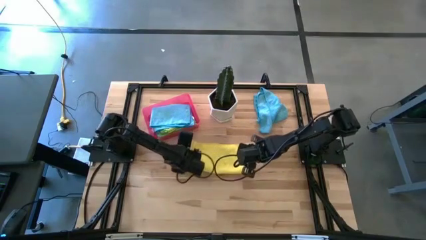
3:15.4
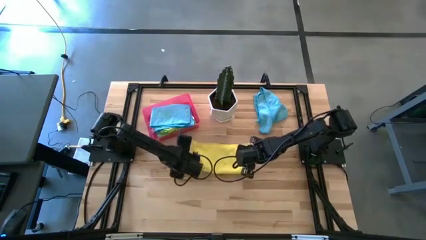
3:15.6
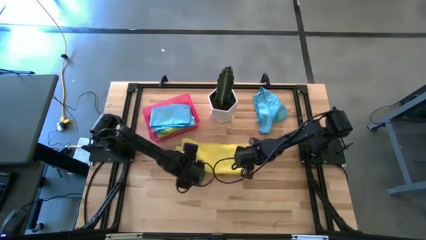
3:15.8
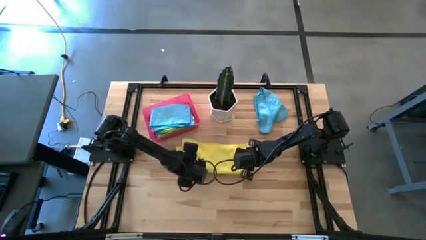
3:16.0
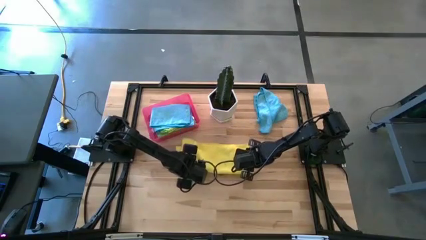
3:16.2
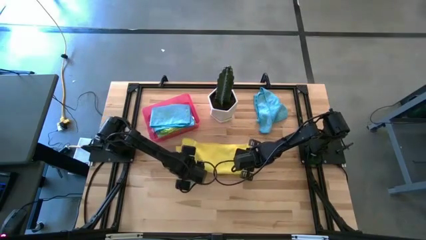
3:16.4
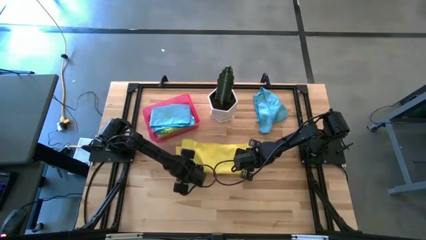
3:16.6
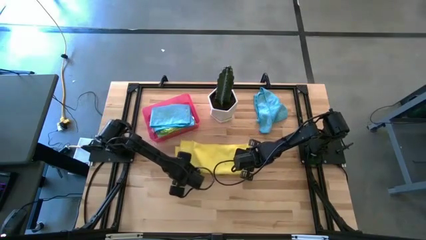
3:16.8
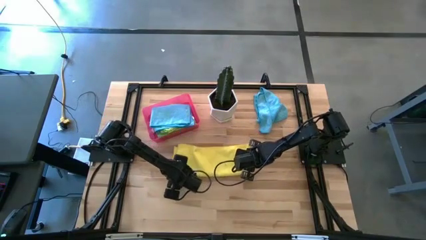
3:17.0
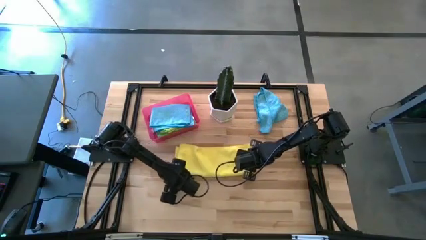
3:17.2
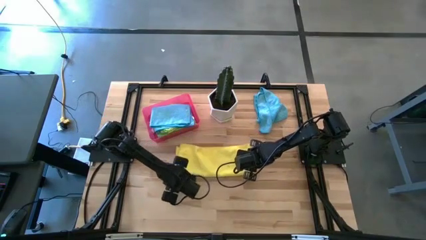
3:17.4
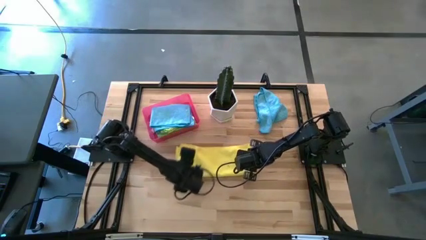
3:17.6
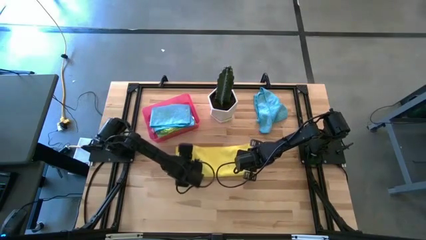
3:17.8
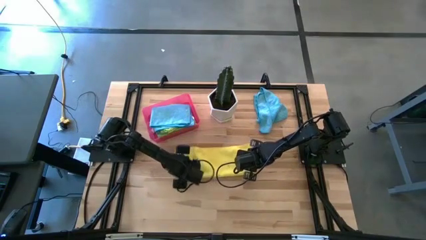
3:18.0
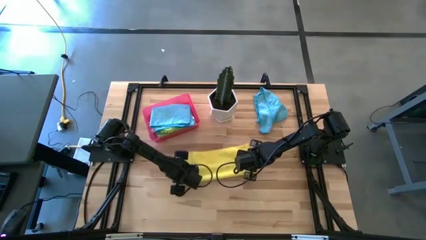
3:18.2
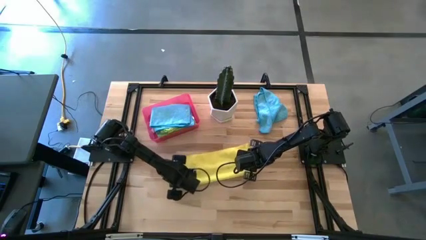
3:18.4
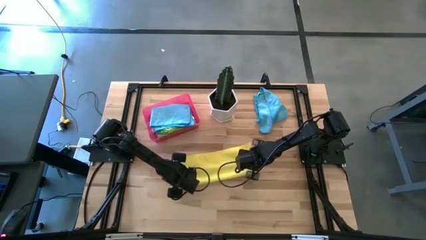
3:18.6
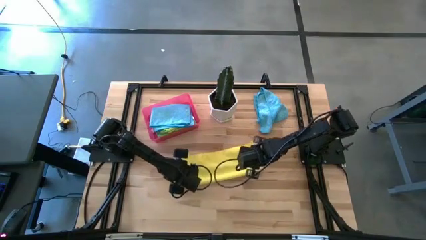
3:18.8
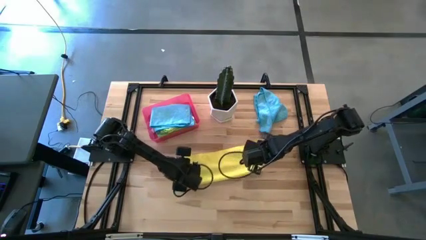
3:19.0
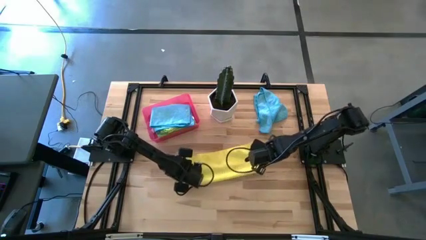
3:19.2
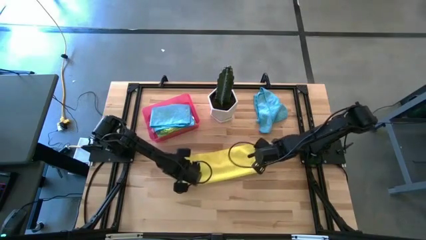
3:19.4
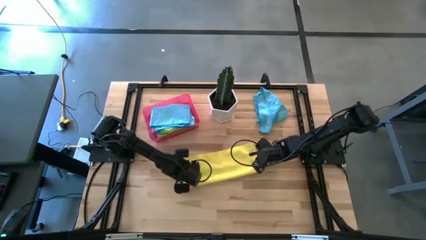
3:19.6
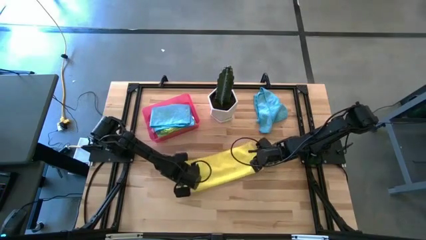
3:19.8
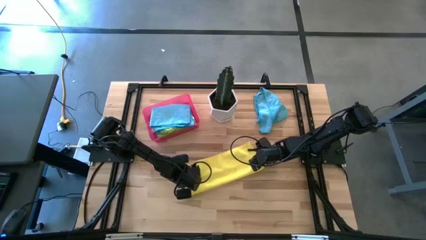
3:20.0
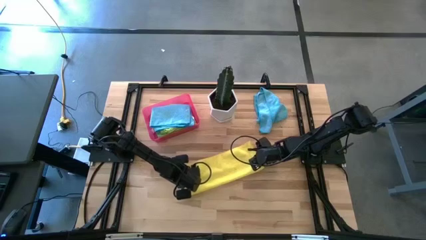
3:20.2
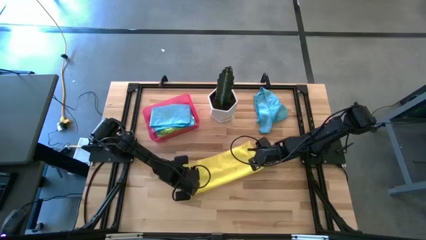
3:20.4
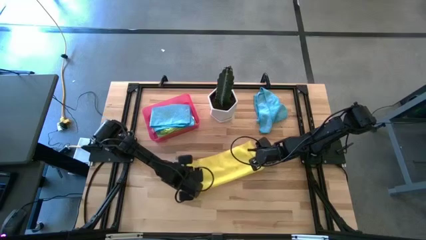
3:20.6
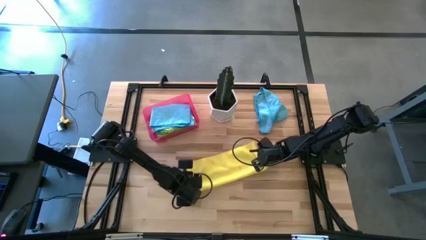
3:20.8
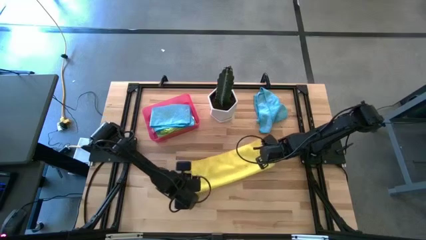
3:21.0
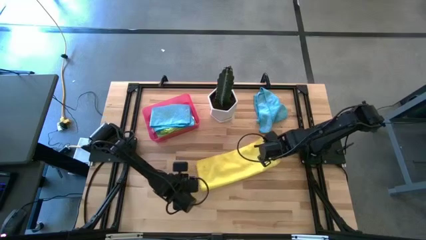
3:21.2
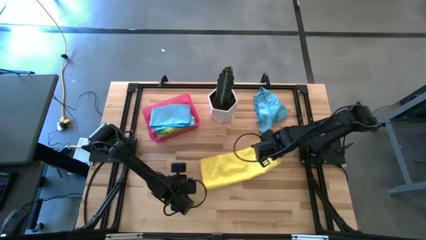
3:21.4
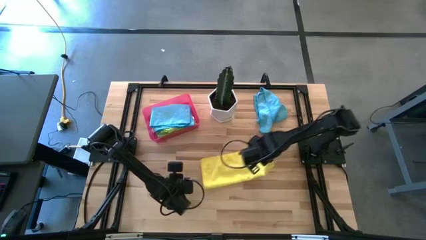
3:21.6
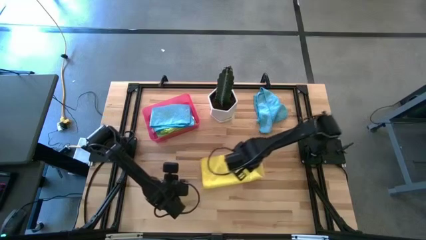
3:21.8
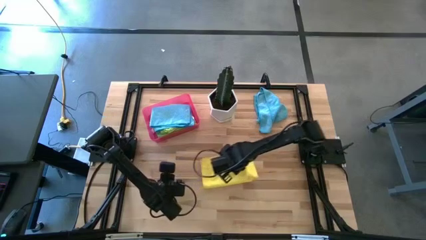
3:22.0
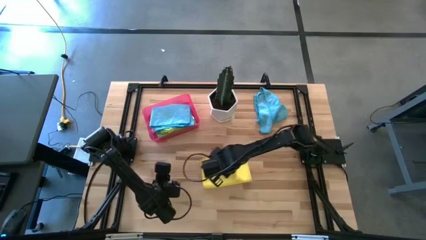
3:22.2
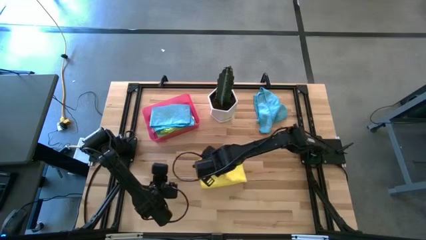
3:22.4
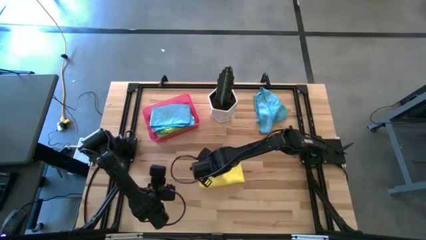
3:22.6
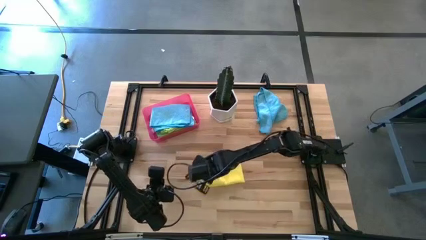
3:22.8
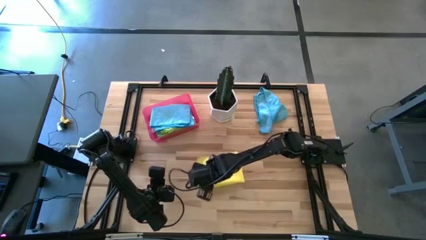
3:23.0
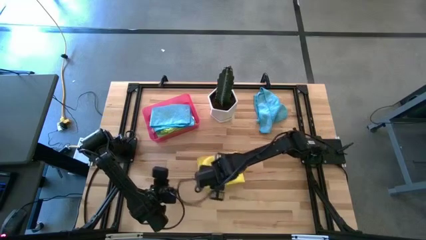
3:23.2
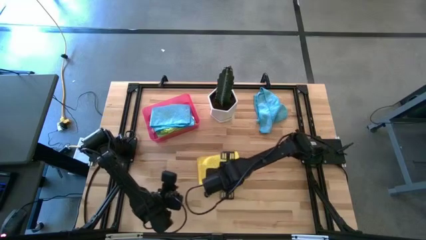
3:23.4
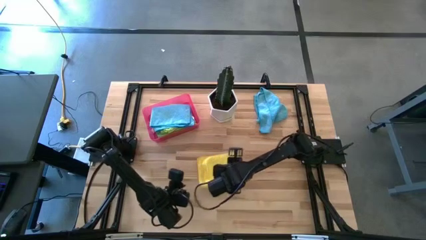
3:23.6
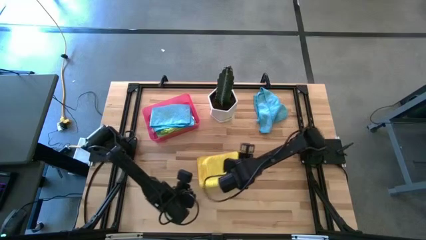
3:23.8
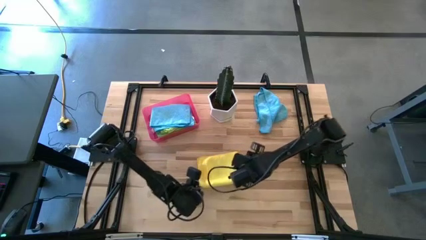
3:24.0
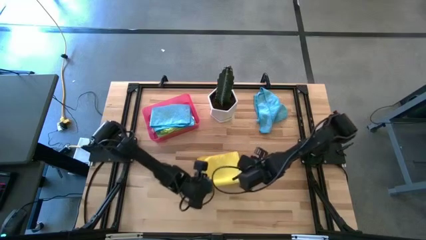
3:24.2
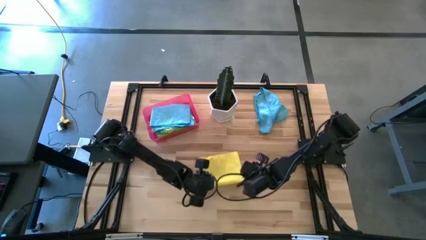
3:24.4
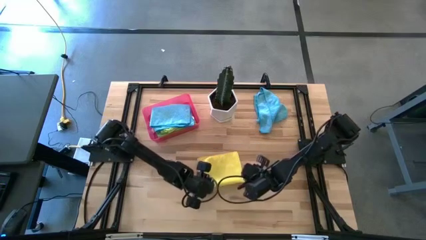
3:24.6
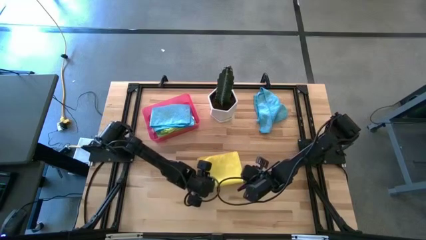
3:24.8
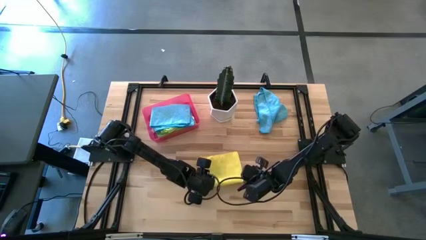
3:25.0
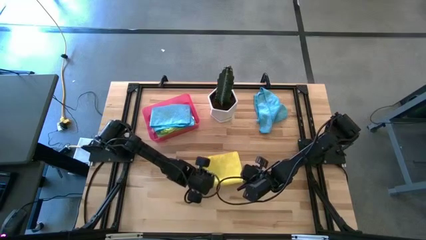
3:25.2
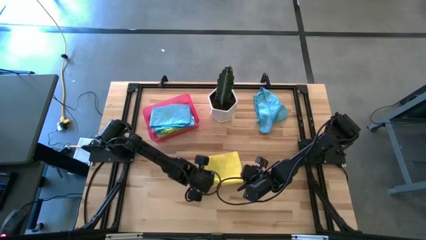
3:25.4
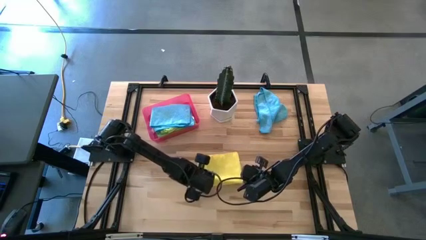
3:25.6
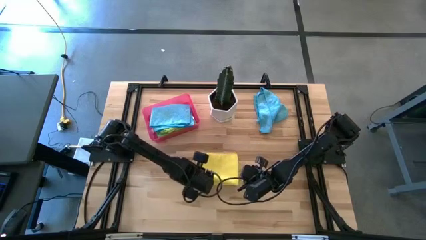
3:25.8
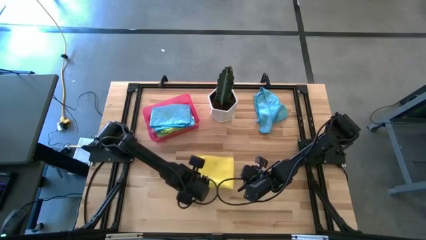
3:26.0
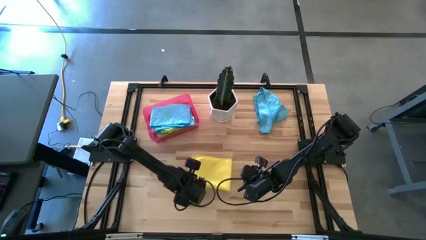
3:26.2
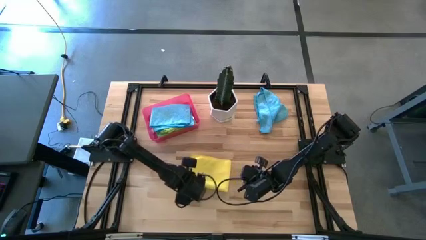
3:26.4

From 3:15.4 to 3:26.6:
Task: Fold microfiber towels
Fold the yellow microfiber cloth

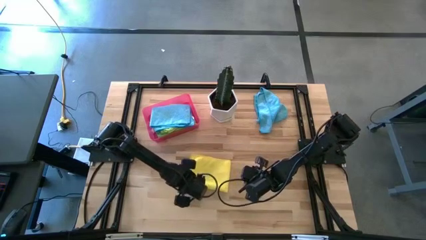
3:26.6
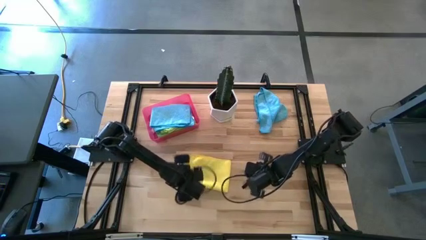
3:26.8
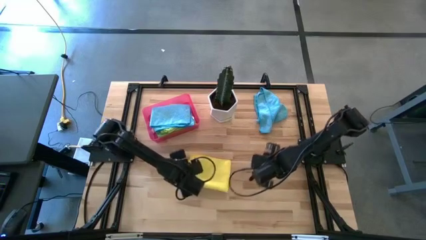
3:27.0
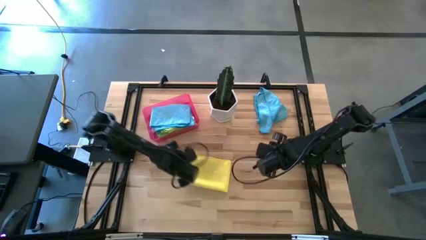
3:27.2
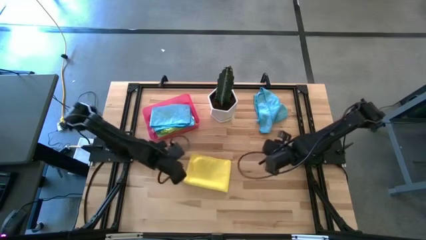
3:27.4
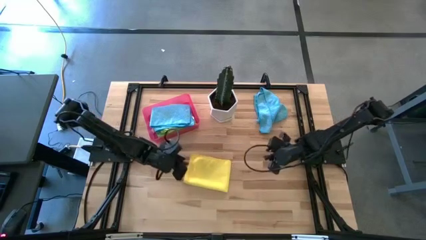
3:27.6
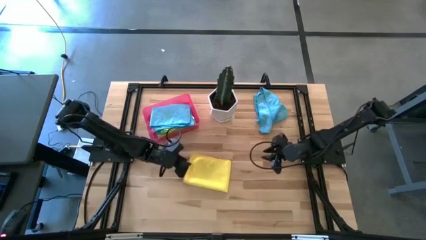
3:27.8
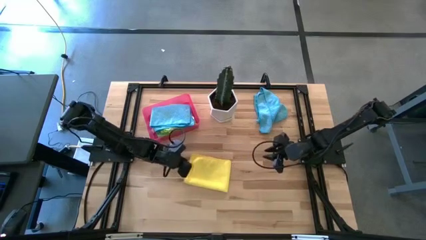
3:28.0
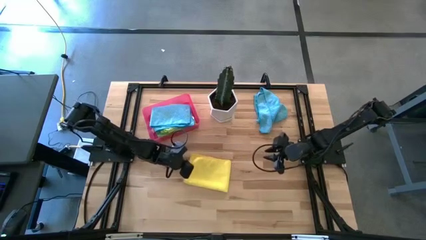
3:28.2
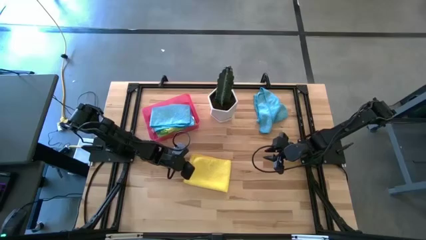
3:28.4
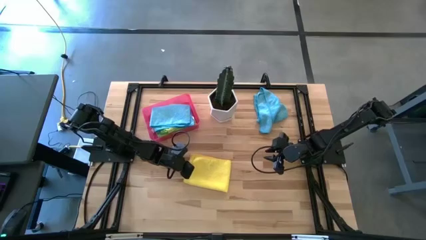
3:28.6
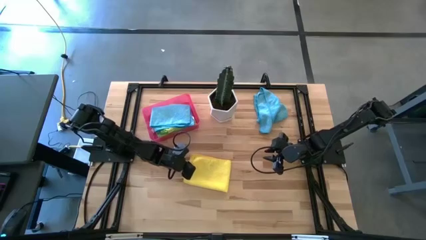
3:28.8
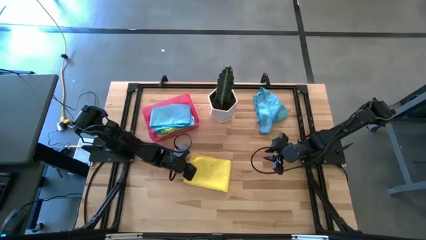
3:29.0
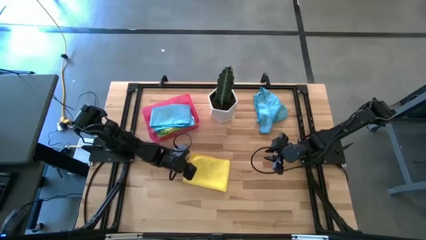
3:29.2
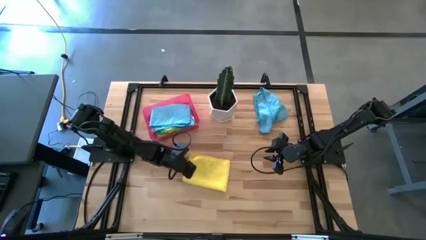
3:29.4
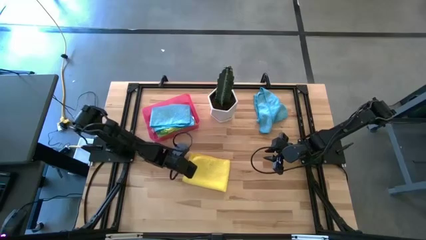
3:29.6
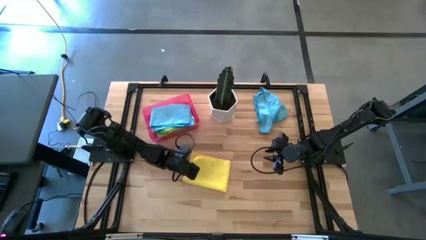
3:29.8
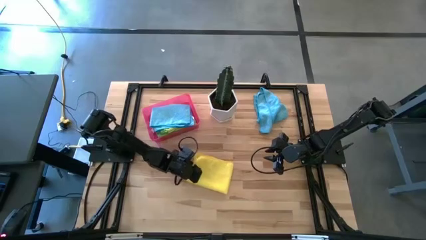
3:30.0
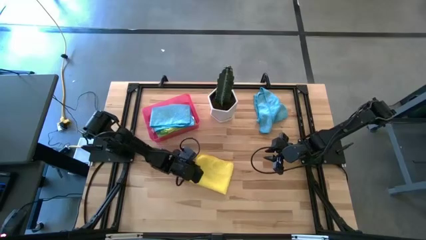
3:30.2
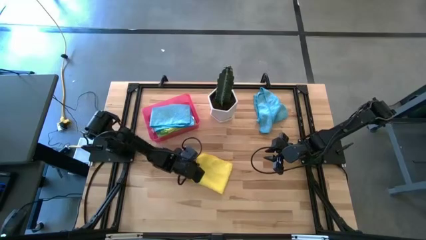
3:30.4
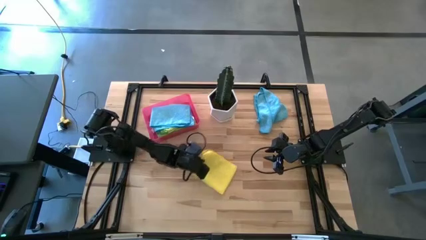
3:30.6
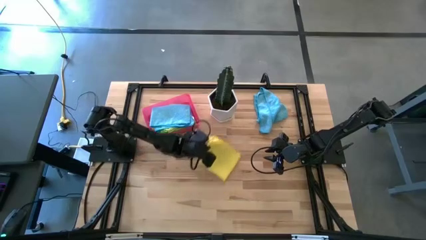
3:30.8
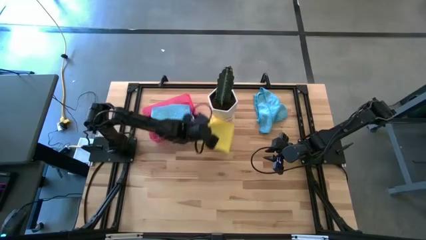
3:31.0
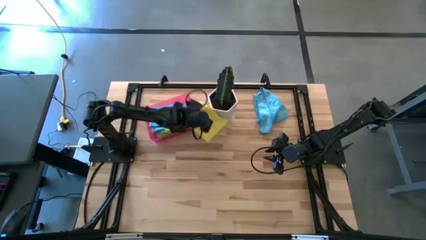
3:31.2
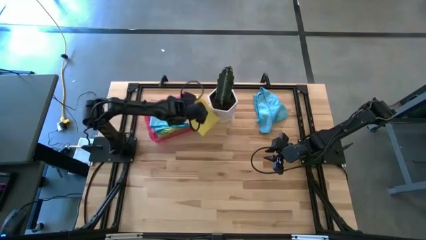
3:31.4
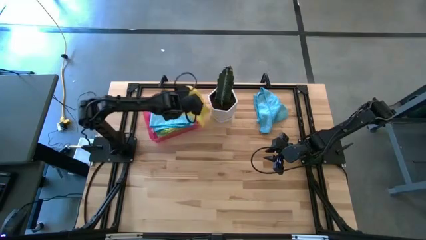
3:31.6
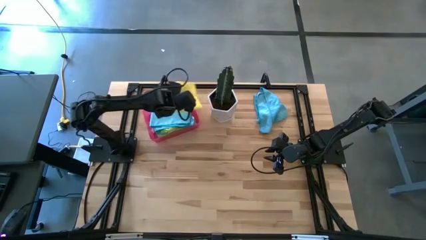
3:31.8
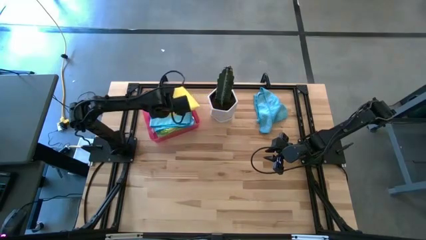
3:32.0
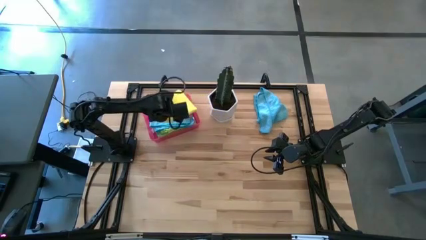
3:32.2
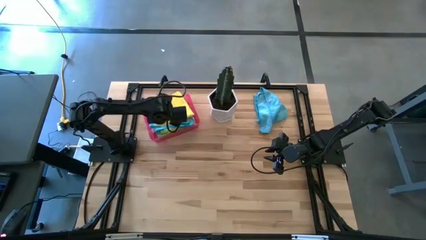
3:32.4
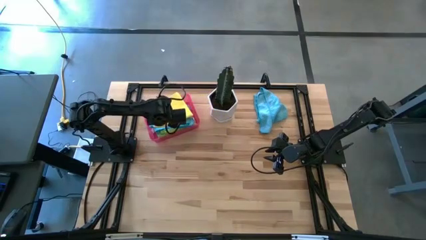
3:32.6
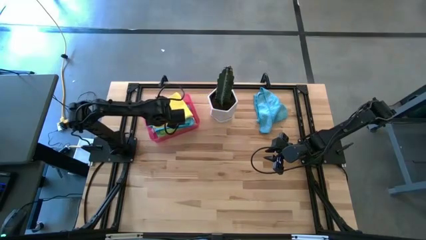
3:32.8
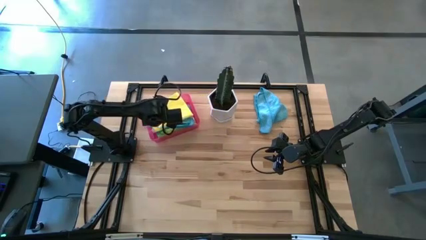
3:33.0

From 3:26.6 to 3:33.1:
Put the folded yellow microfiber cloth into the transparent pink bin
